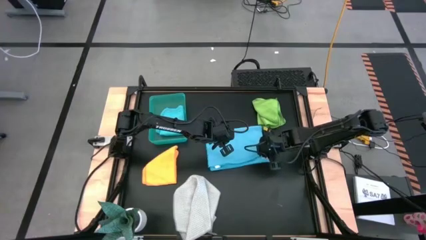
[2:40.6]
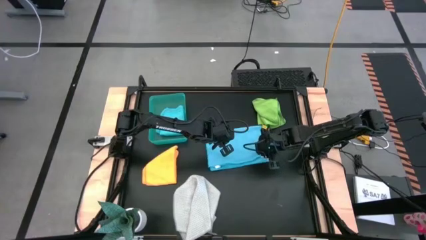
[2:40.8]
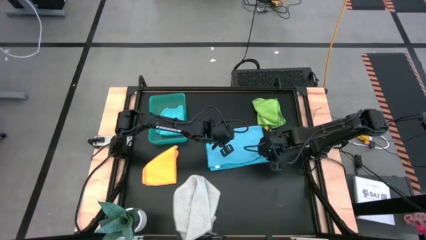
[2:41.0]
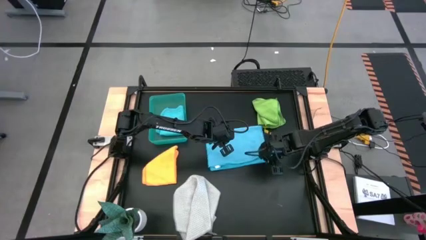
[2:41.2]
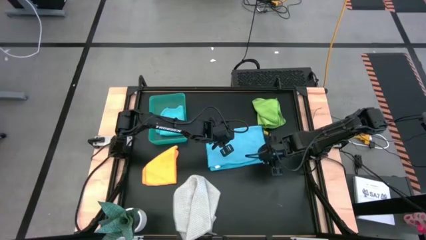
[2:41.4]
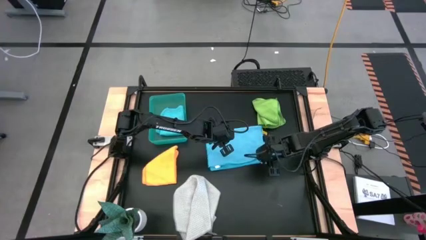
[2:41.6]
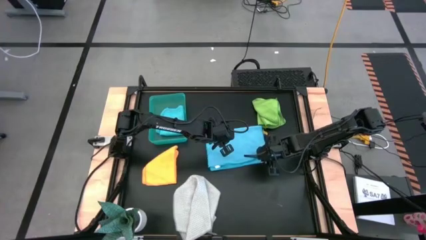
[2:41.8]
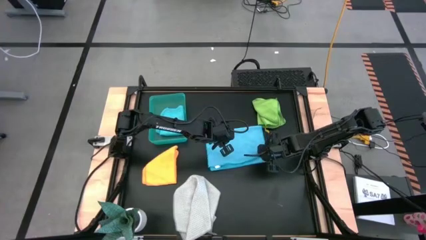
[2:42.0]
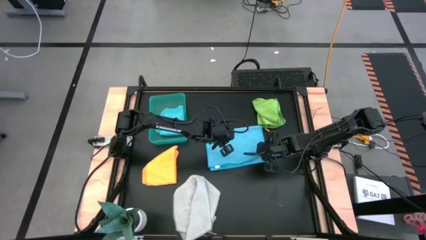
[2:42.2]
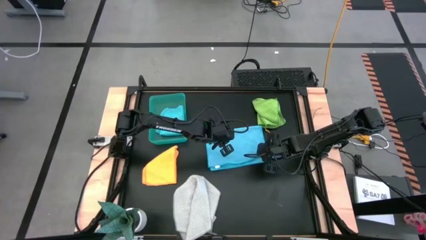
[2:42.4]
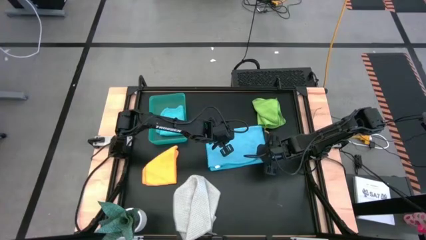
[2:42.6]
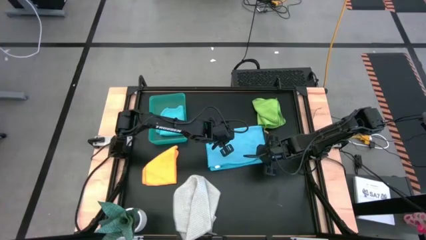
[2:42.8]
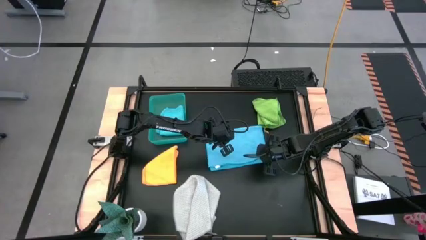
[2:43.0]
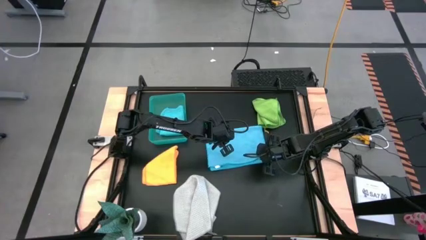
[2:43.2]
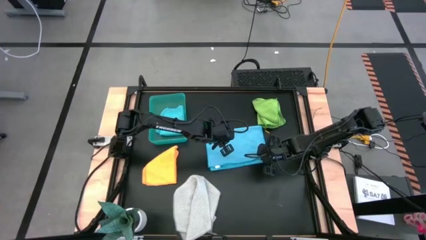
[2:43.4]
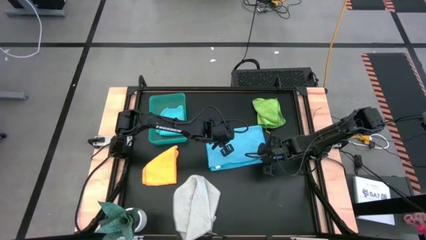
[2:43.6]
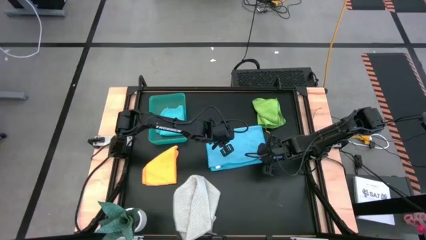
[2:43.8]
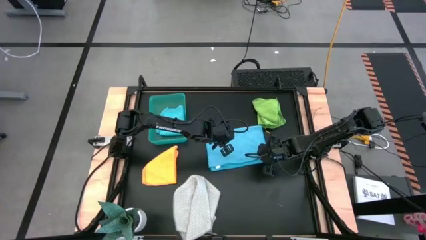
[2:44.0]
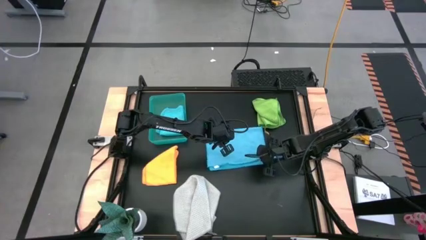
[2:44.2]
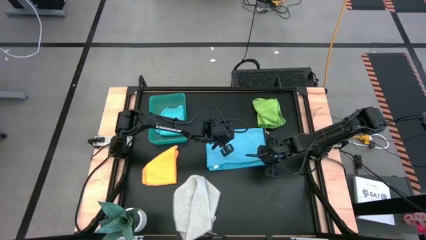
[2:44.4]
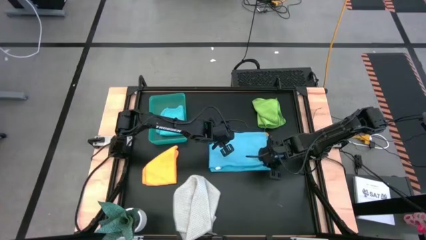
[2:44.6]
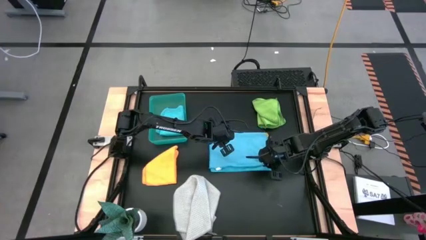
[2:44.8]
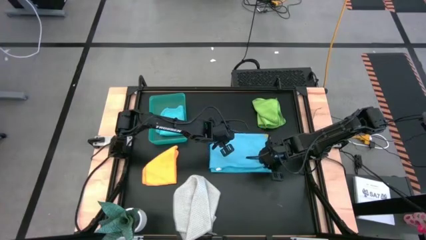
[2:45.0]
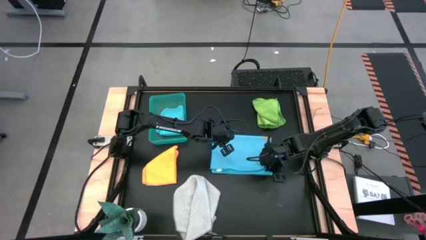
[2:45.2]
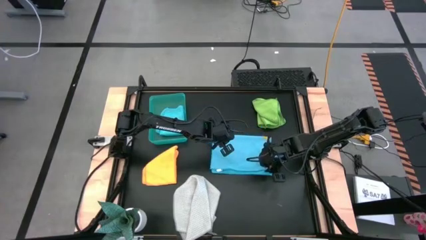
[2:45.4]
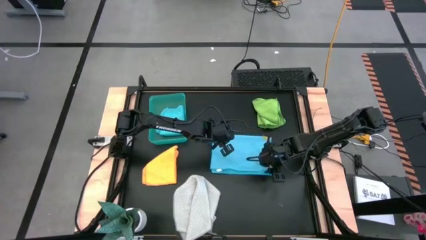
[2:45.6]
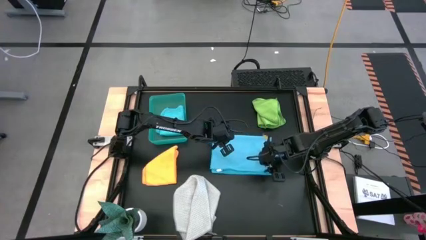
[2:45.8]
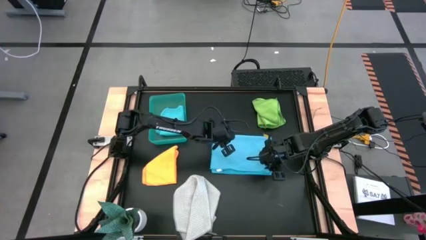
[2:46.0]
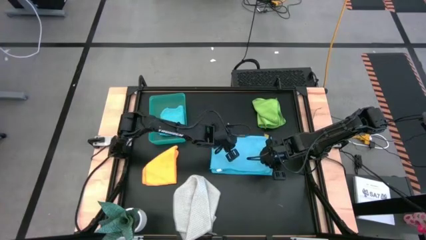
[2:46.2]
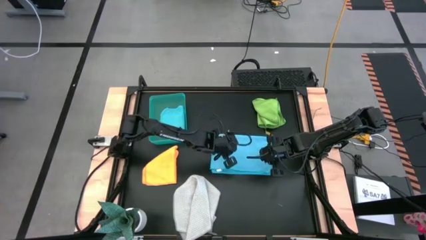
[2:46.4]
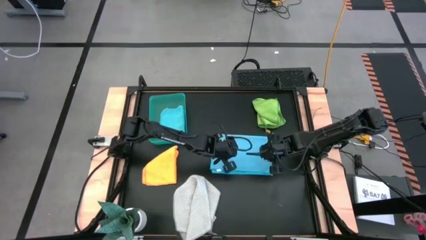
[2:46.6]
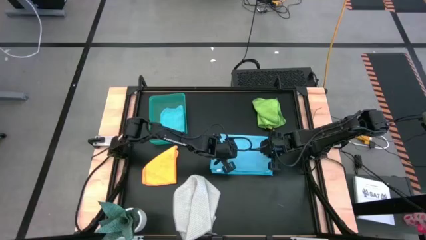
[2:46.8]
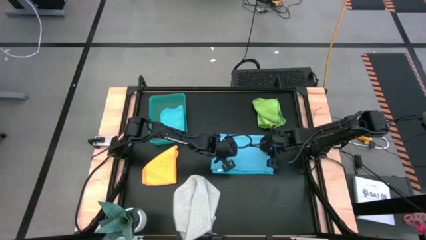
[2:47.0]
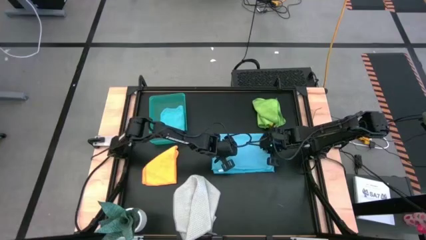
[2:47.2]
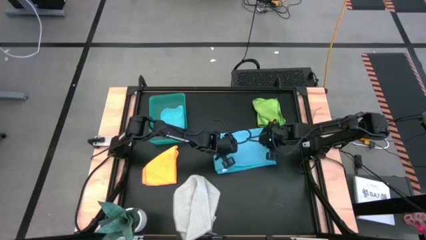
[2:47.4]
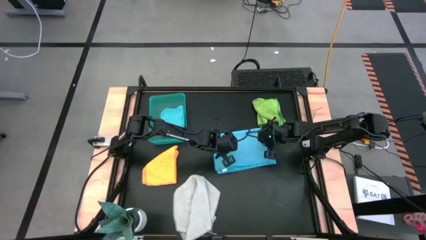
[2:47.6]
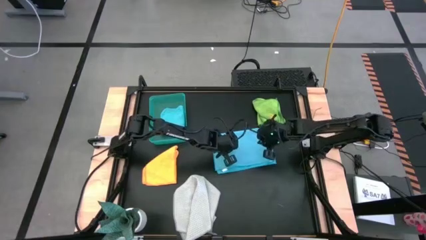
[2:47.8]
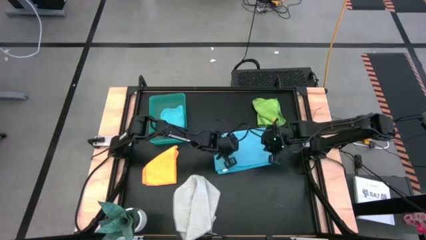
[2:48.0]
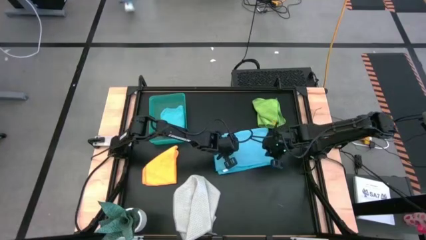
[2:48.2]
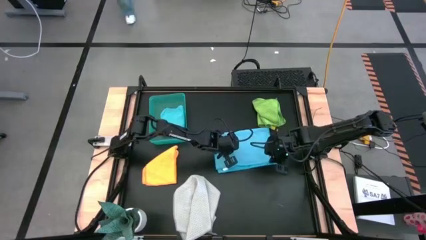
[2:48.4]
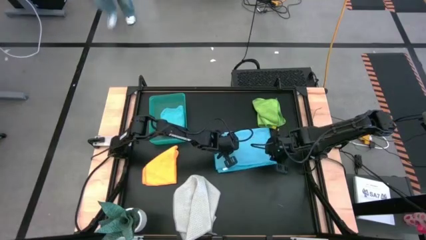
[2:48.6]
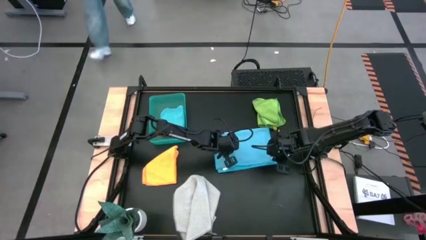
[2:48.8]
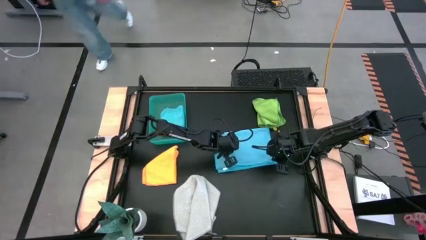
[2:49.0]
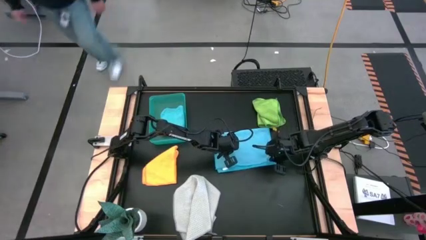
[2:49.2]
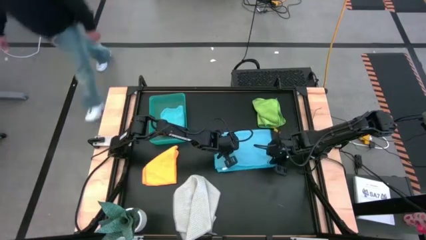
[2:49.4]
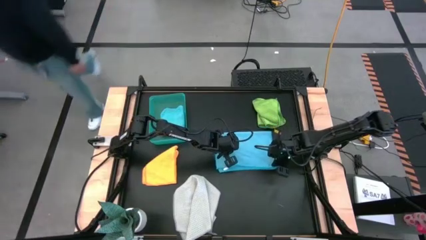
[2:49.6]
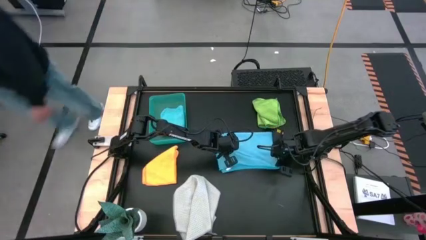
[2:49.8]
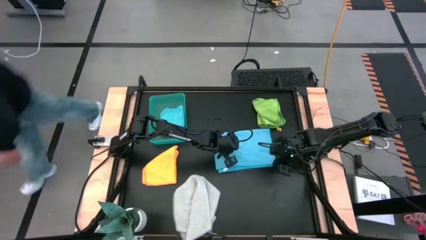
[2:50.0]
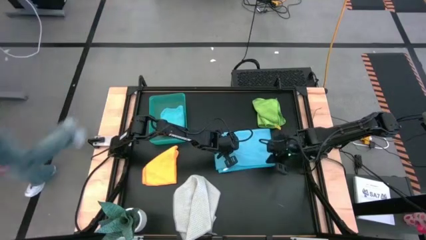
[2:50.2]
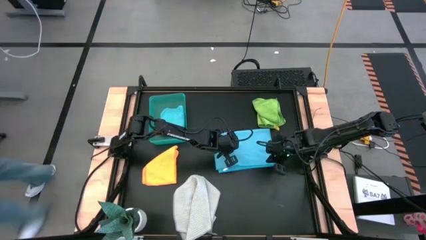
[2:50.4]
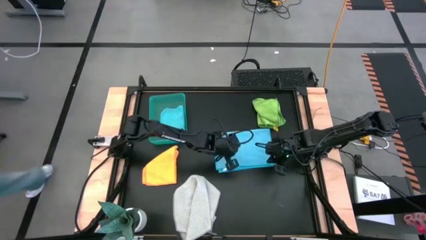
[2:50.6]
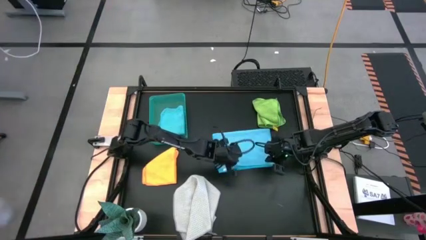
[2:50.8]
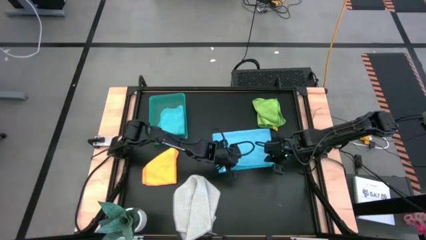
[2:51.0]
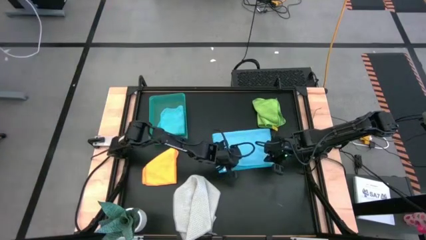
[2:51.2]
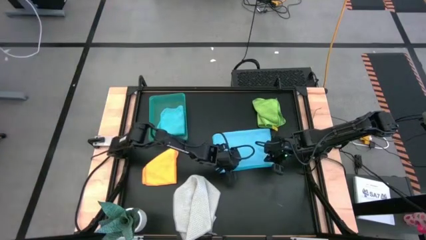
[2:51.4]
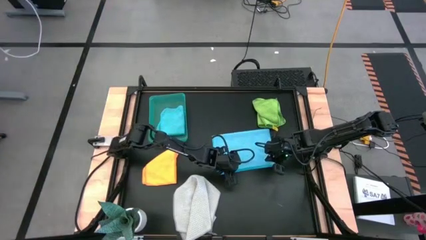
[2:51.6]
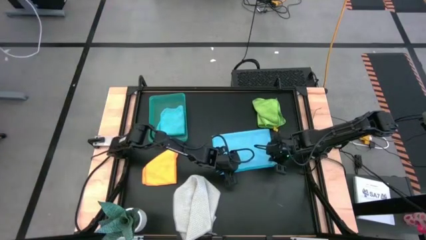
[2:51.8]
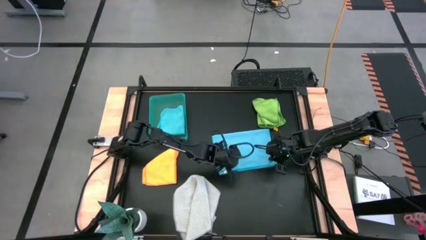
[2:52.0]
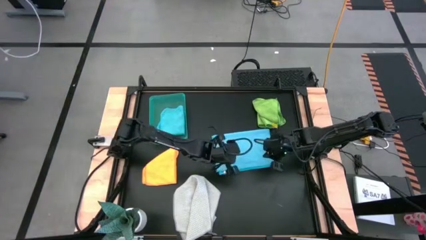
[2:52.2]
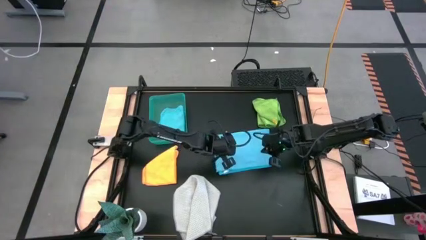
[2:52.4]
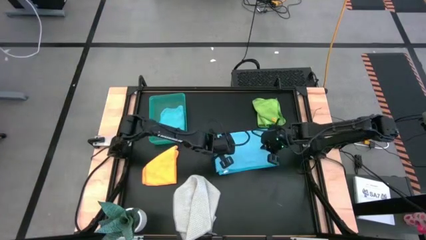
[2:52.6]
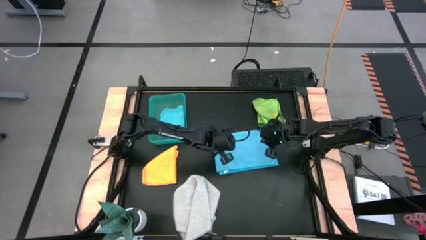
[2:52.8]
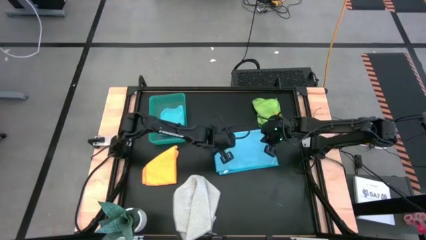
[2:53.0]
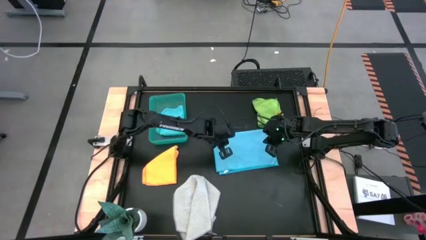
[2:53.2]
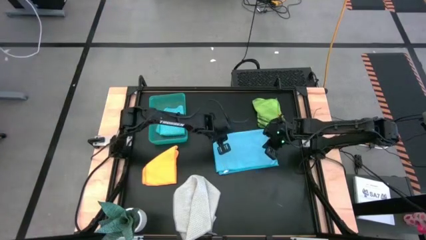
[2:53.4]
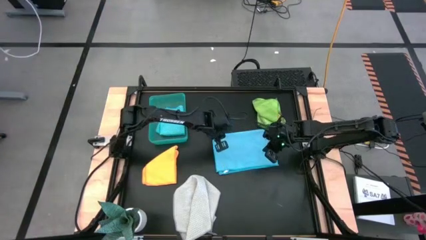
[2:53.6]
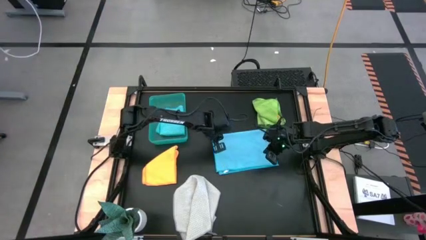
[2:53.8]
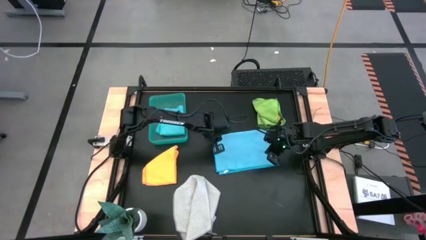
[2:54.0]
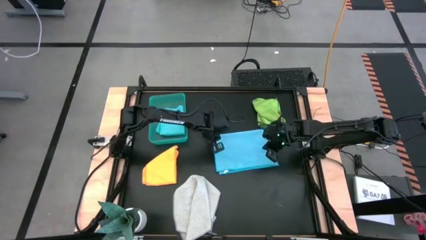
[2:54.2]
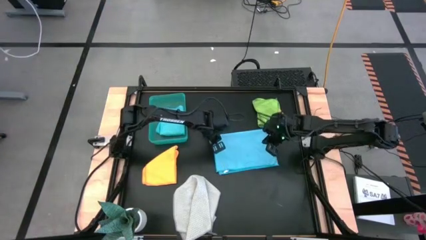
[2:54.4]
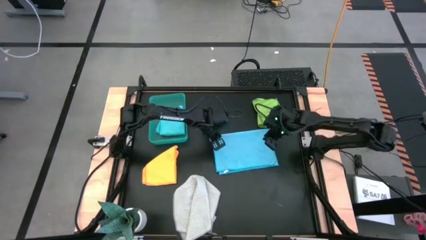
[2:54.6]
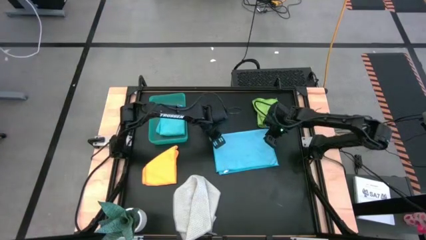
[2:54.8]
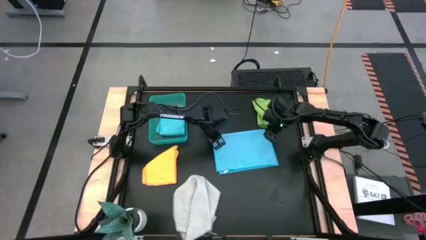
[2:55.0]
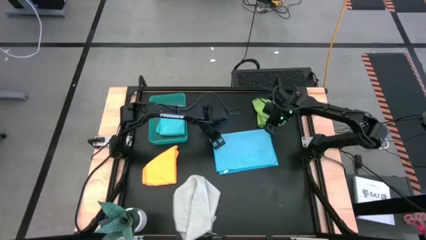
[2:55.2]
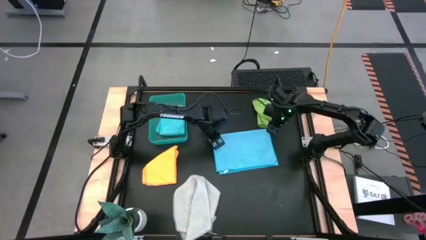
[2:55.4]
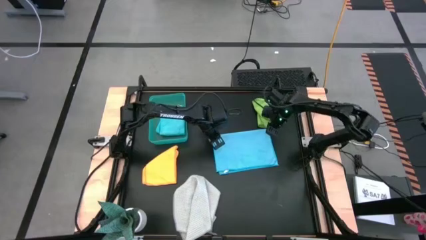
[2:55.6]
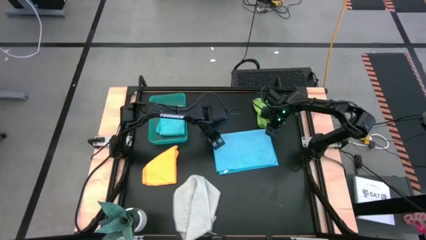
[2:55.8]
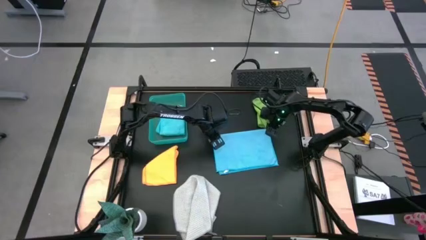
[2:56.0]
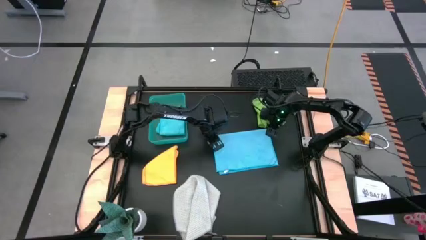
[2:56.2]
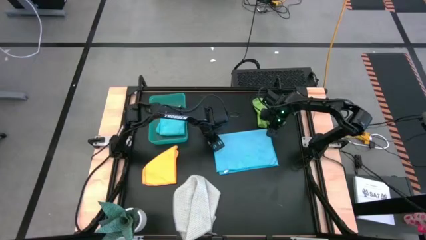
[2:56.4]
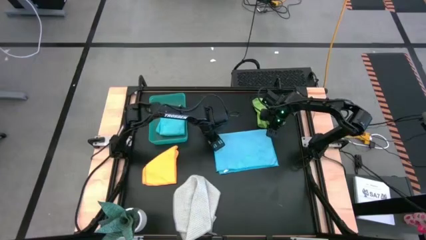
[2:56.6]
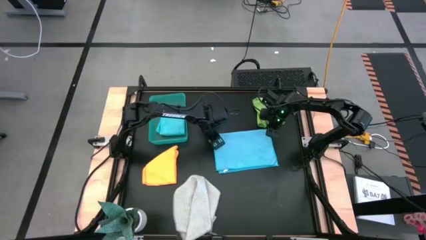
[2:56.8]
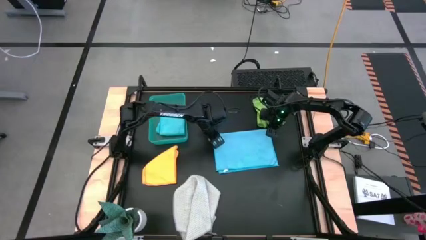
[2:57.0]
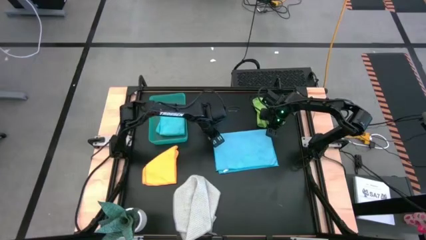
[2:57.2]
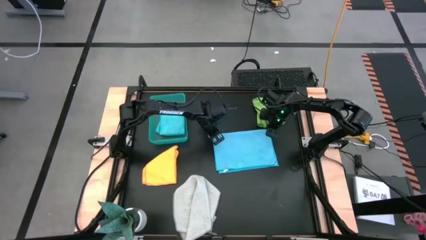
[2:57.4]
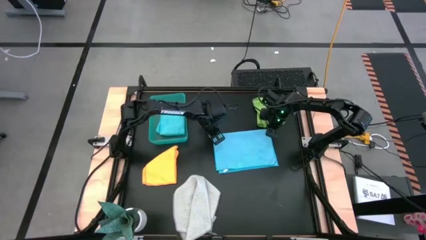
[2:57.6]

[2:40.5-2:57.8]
Task: Fold microfiber towels
Fold the blue microfiber towel
